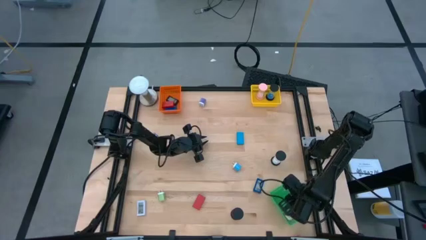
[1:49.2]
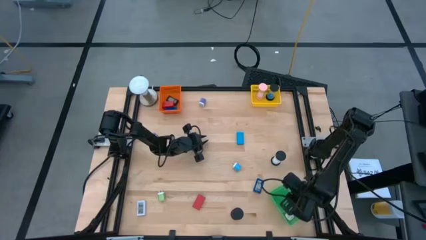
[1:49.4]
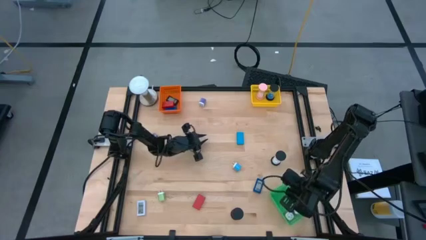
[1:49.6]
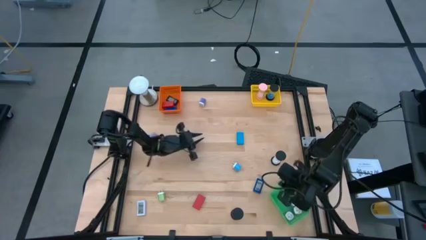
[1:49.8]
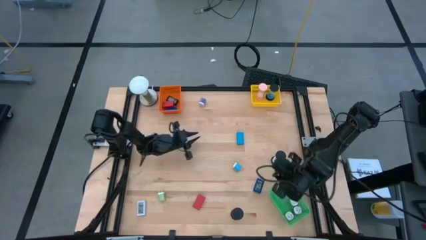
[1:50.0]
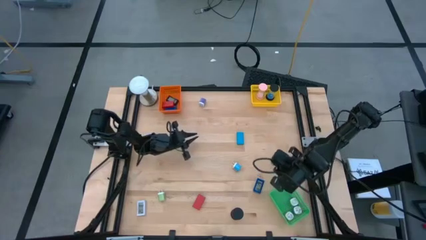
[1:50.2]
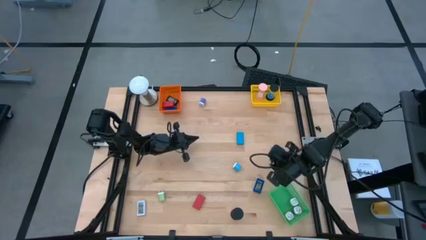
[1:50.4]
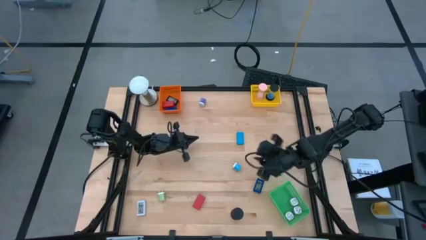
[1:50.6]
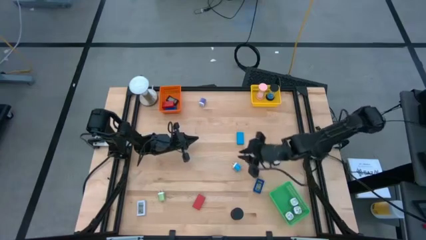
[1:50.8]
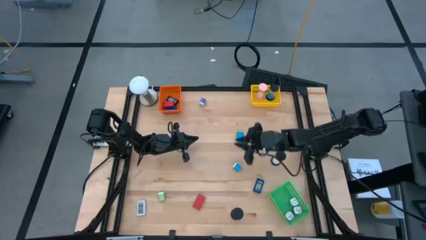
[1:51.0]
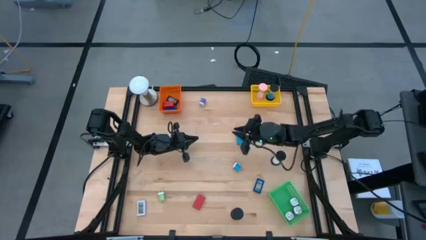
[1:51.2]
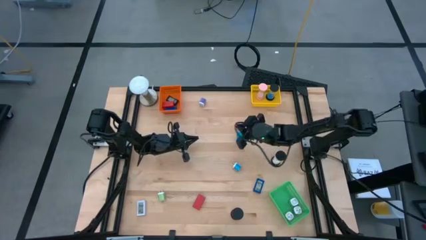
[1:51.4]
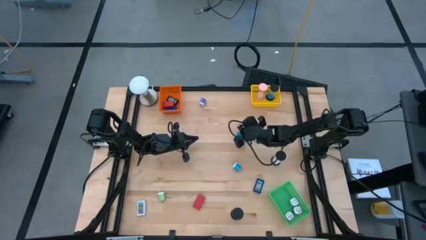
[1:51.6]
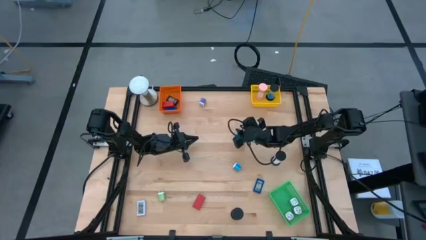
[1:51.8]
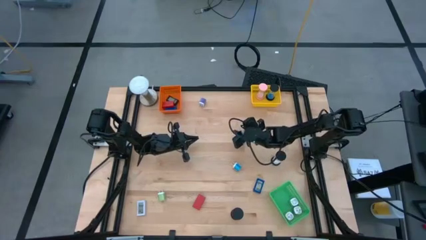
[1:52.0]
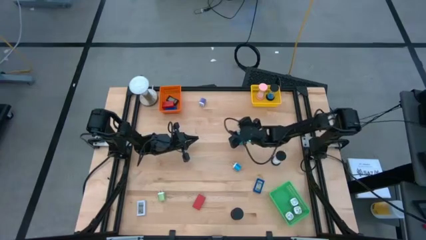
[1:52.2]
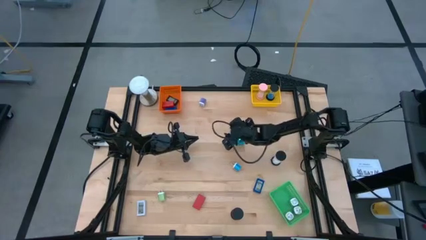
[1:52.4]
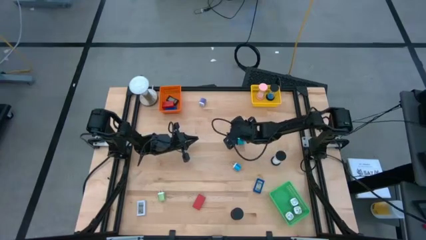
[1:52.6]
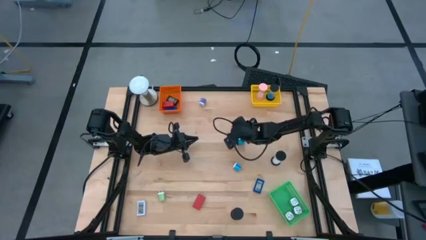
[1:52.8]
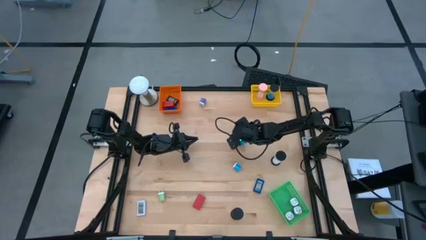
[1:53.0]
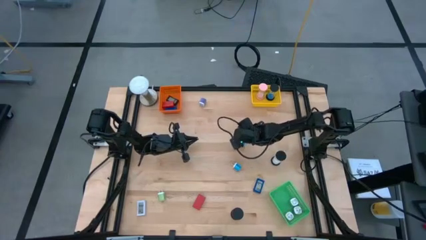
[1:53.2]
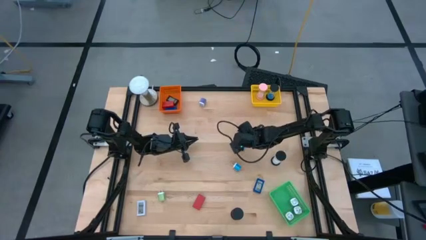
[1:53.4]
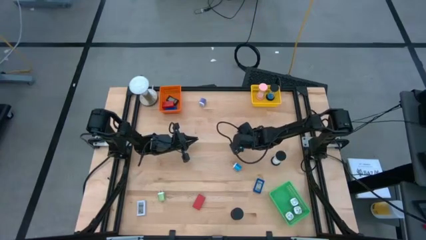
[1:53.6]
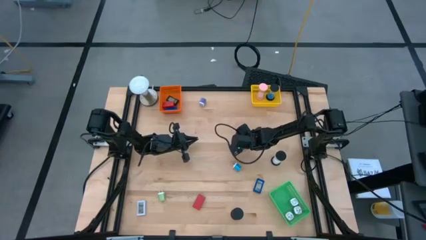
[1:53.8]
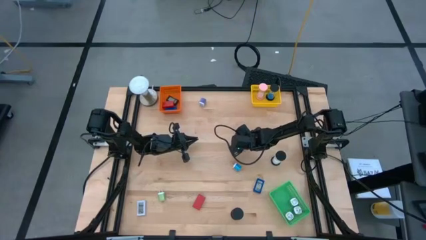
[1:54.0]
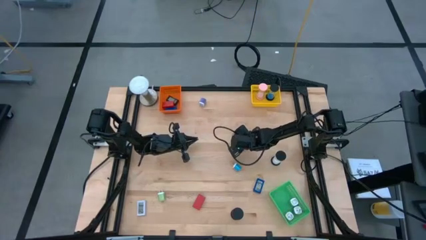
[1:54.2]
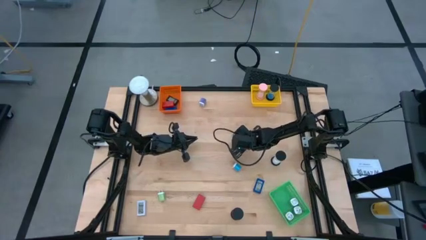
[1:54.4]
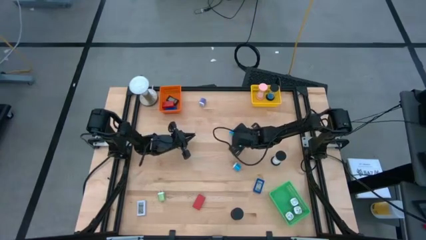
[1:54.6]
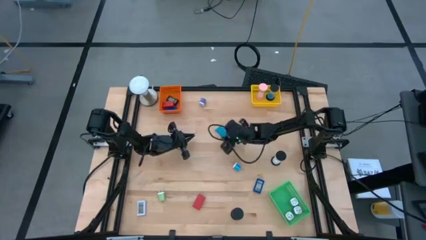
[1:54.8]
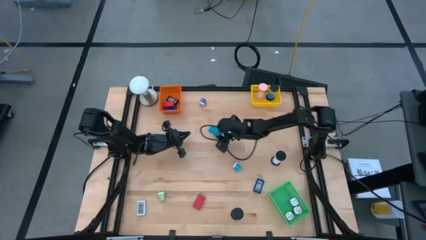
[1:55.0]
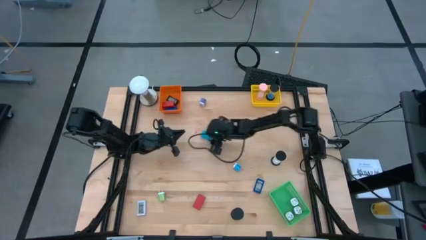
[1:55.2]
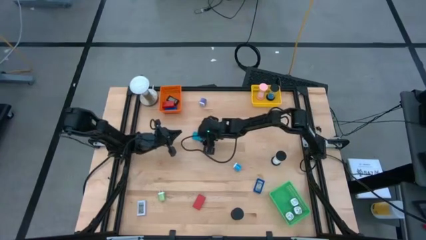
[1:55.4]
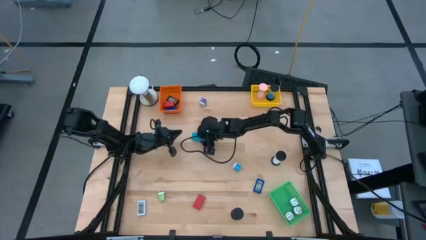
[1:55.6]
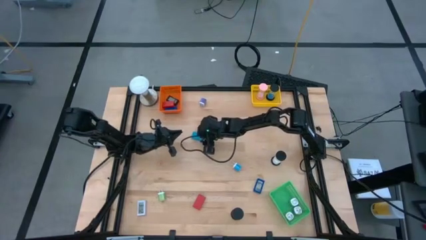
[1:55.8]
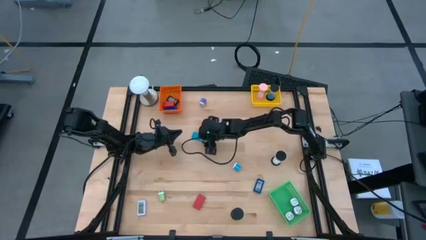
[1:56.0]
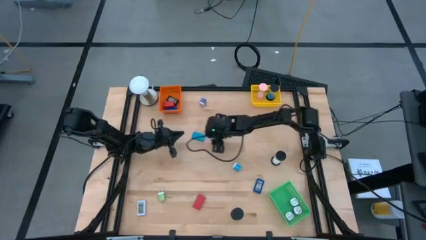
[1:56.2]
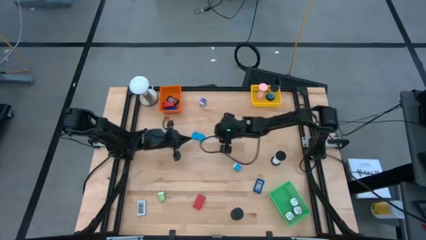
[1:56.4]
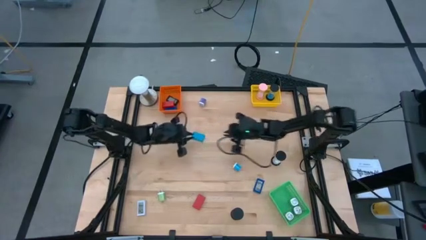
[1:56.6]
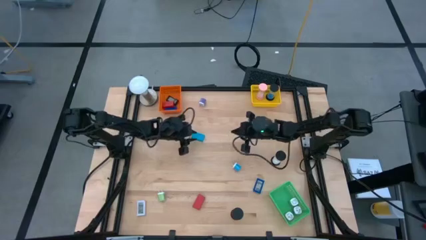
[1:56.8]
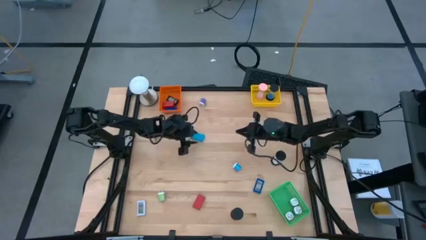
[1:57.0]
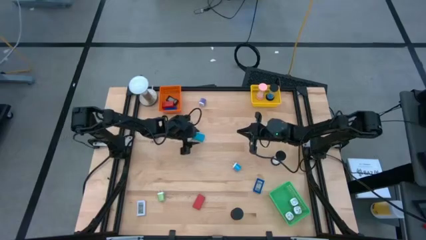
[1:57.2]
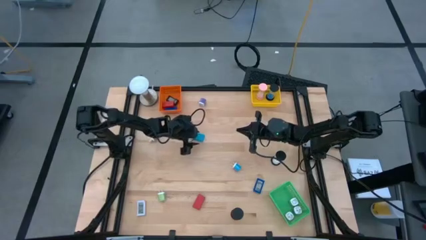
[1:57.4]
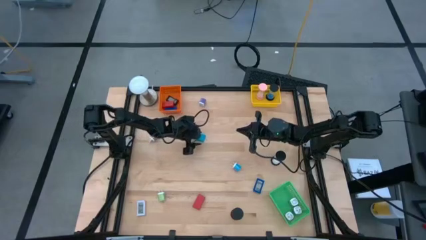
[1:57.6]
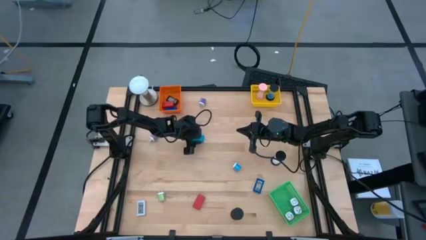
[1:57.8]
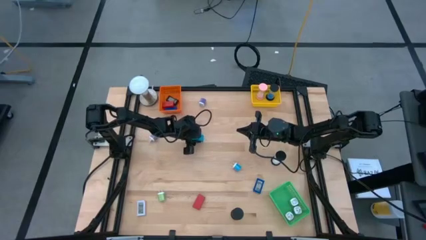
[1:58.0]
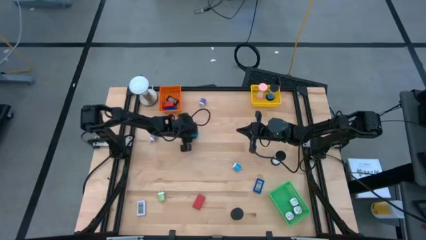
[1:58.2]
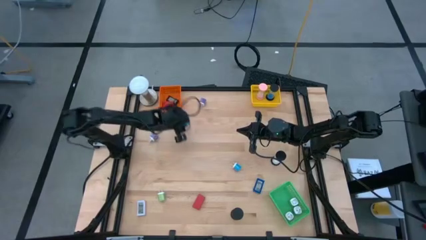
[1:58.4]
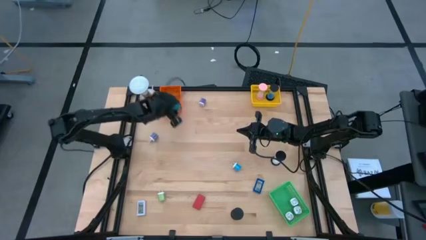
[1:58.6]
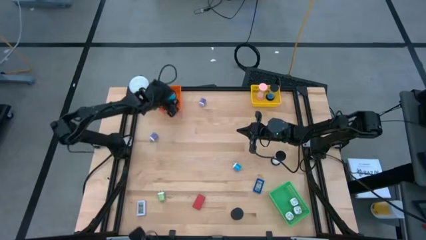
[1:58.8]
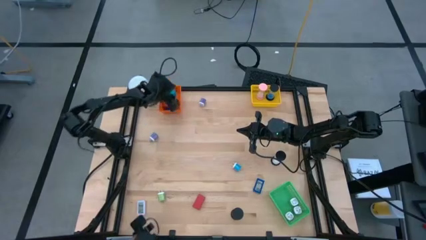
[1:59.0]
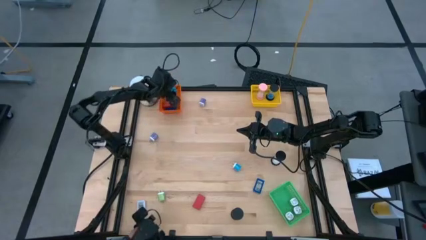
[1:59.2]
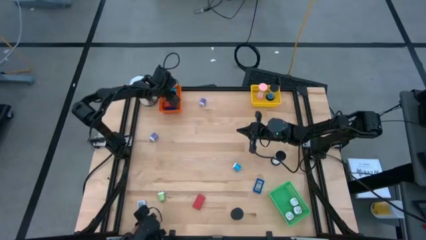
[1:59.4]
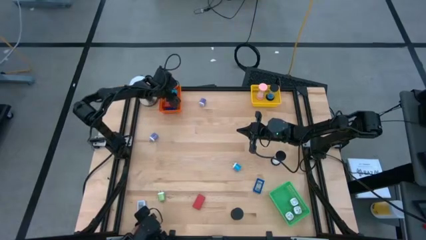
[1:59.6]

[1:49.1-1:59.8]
Task: Pick & Place Office items
Put the light blue digital clock into the orange bin

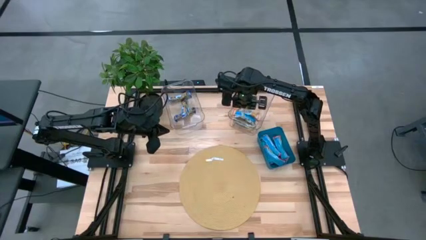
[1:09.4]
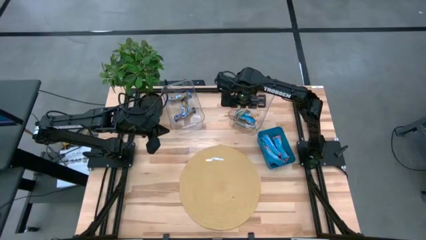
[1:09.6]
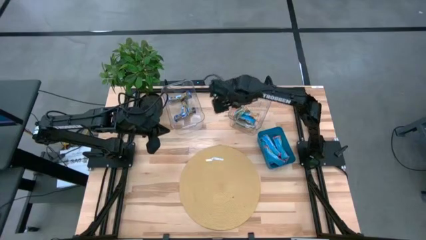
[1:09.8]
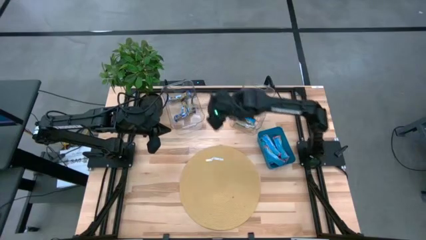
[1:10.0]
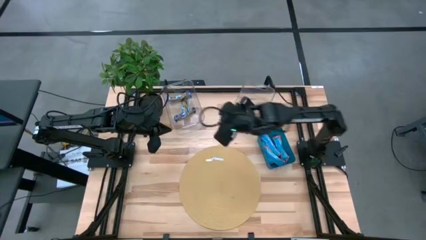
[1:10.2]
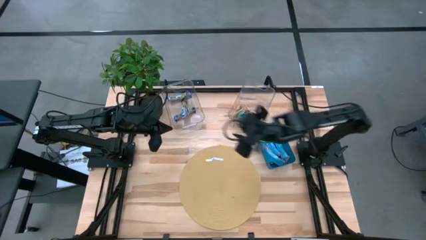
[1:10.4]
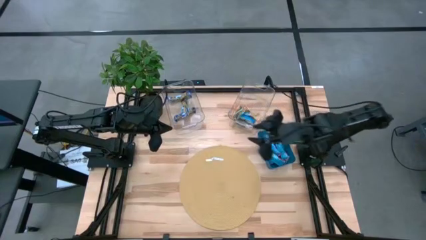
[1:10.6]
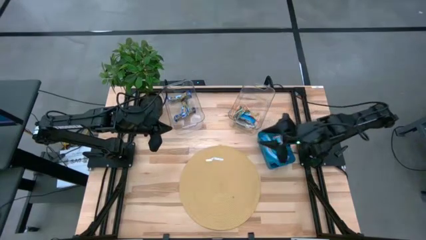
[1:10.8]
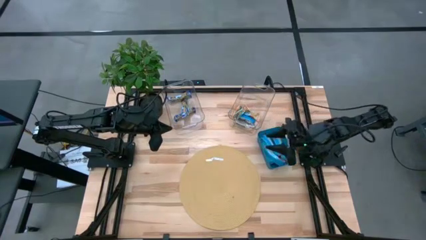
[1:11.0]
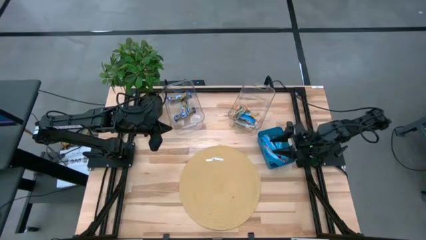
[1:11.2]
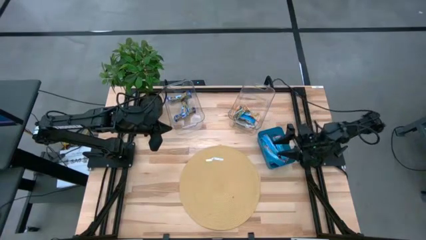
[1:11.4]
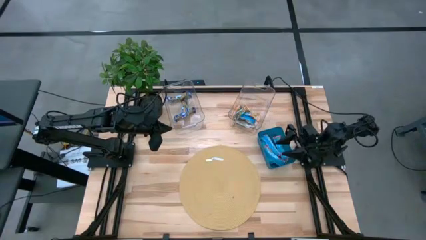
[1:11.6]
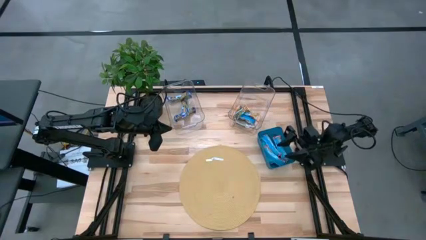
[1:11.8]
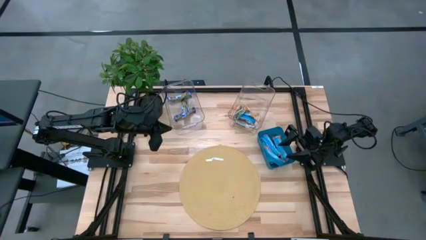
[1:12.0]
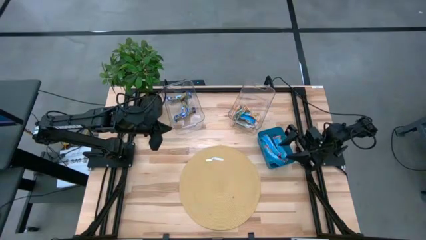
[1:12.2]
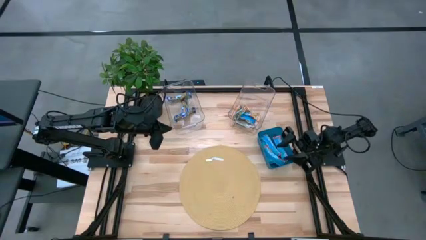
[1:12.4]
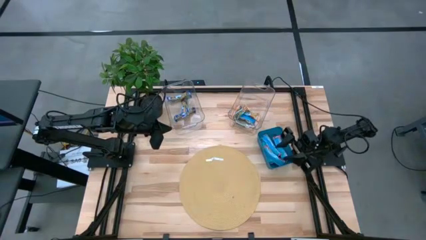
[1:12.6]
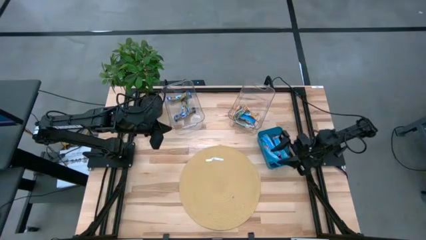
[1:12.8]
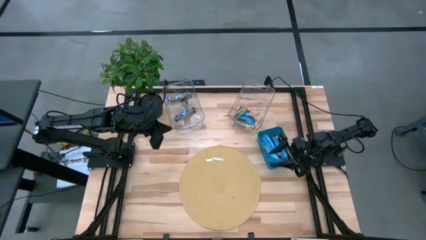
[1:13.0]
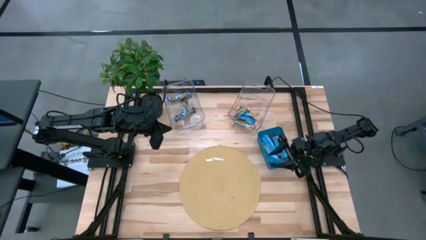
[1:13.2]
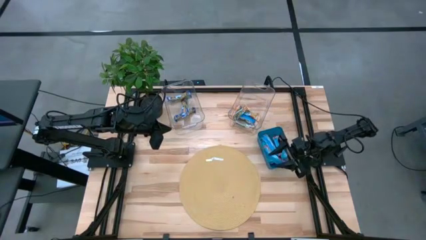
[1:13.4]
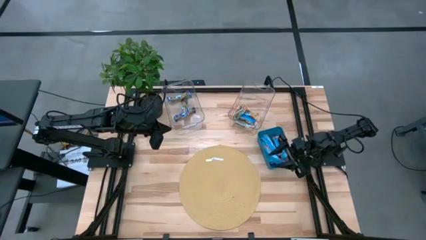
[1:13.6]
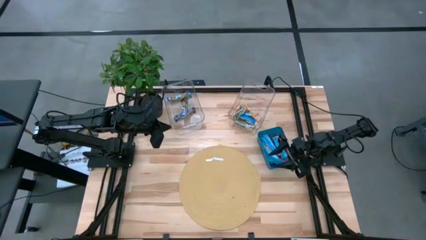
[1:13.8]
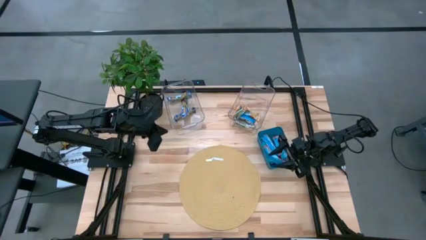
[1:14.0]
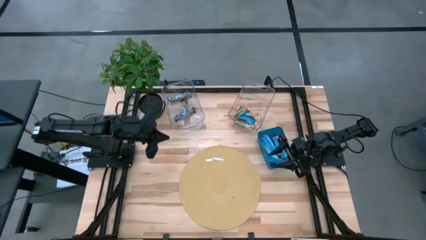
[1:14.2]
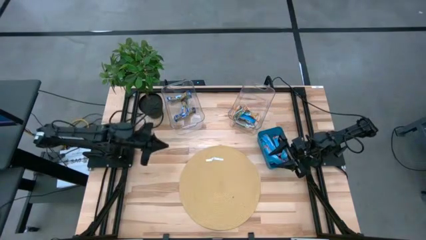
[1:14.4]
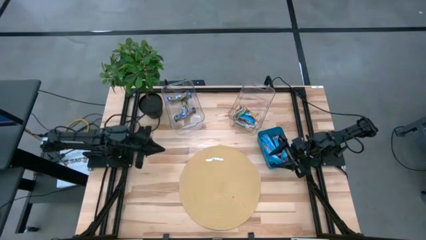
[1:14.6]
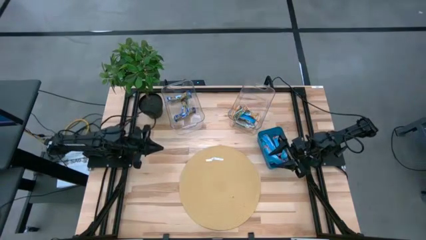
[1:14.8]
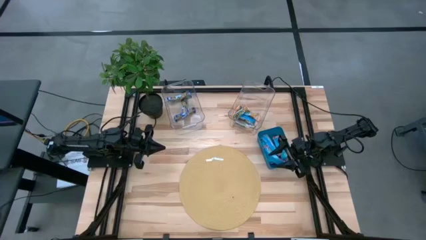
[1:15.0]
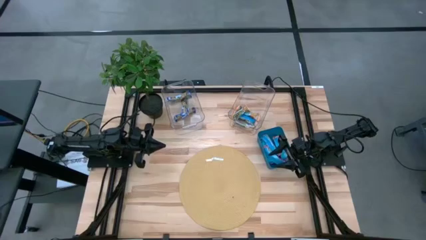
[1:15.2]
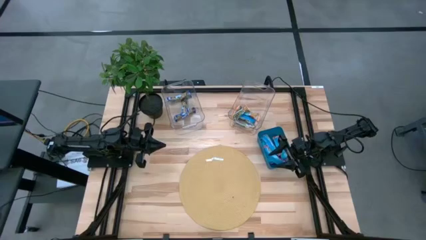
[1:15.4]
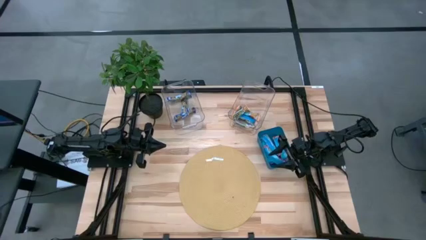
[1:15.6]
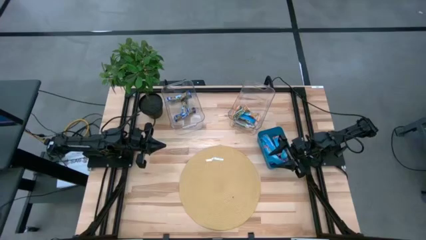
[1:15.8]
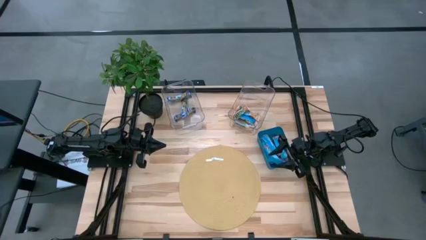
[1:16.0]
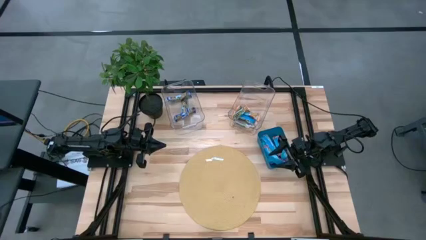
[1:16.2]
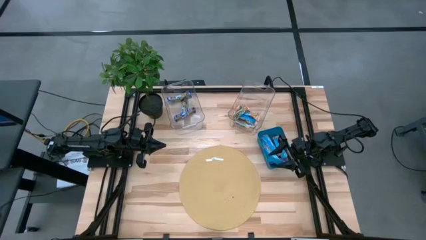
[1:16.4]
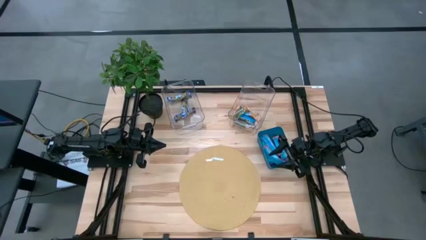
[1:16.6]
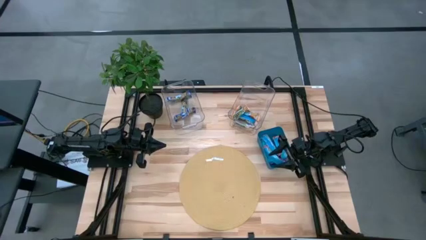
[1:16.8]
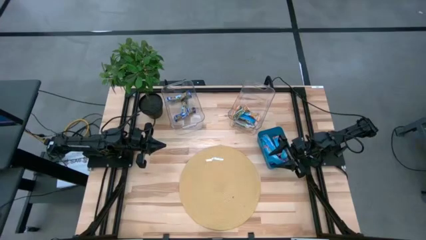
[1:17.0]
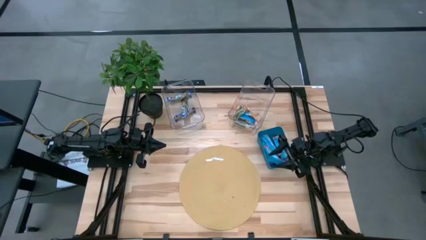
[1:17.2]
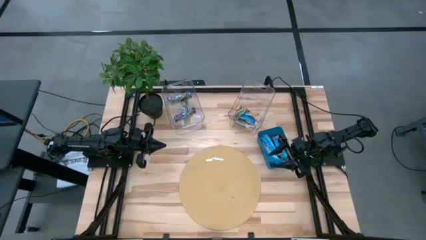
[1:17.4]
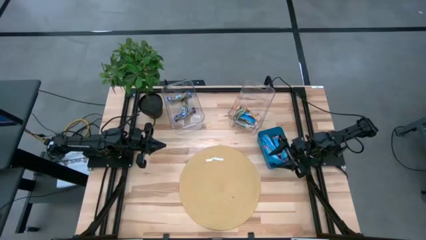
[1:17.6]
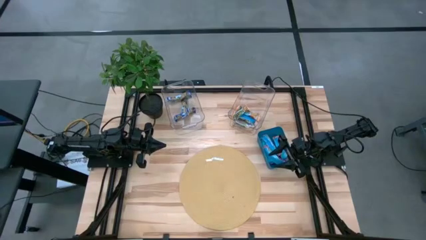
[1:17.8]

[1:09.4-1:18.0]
Task: Pick and place Granola Bars by type
Return to Home Position
